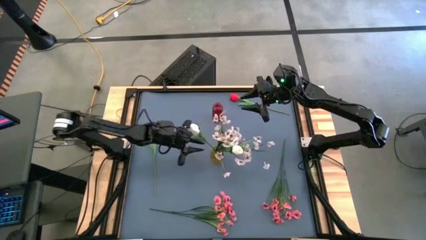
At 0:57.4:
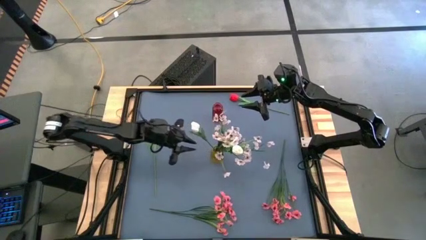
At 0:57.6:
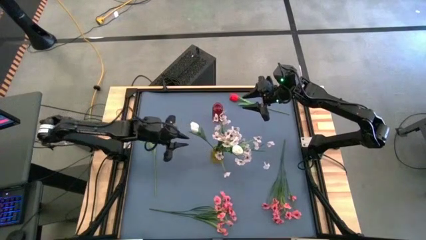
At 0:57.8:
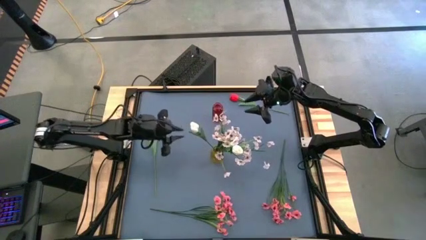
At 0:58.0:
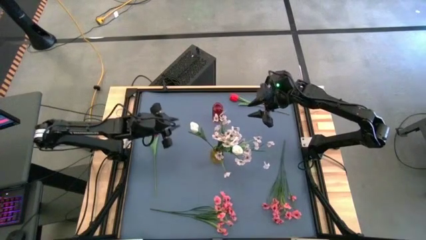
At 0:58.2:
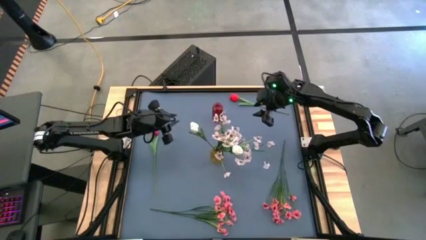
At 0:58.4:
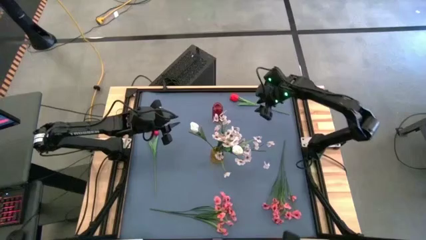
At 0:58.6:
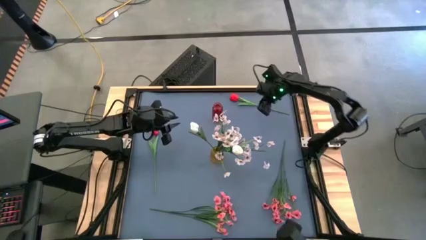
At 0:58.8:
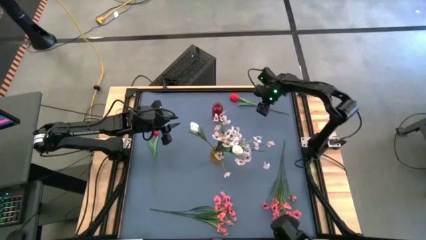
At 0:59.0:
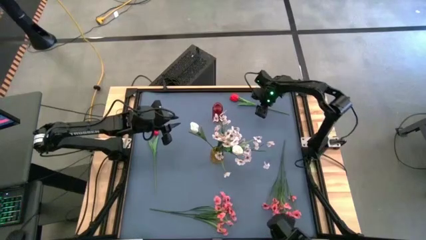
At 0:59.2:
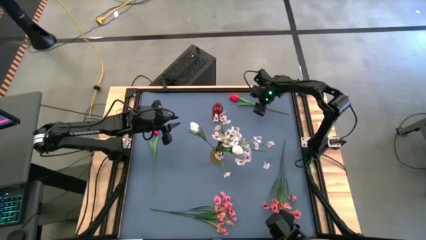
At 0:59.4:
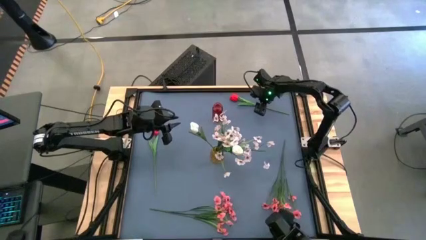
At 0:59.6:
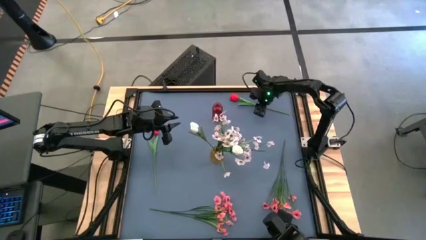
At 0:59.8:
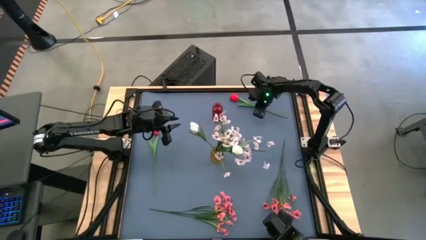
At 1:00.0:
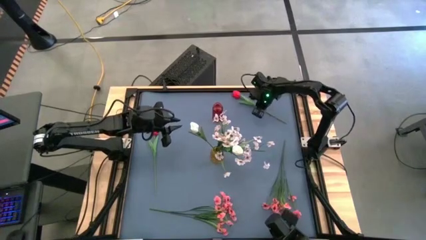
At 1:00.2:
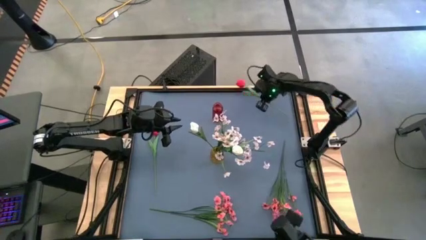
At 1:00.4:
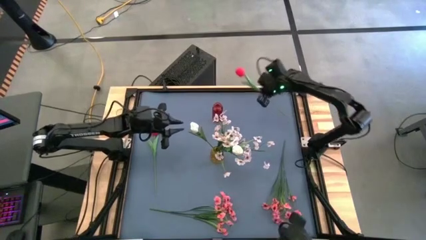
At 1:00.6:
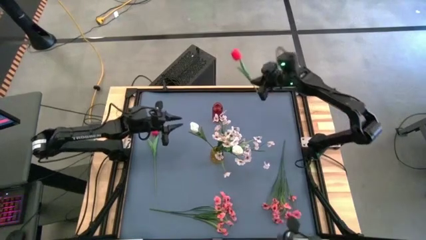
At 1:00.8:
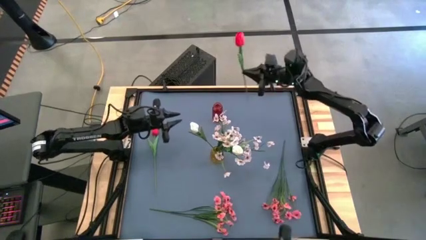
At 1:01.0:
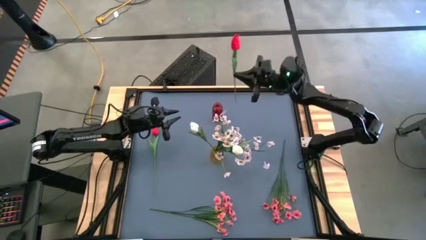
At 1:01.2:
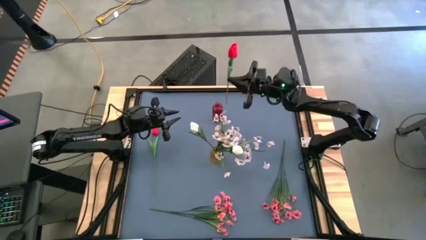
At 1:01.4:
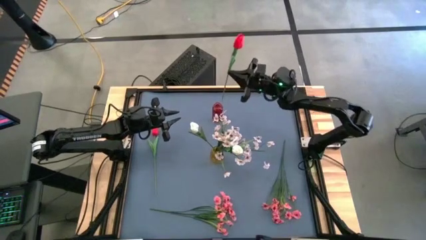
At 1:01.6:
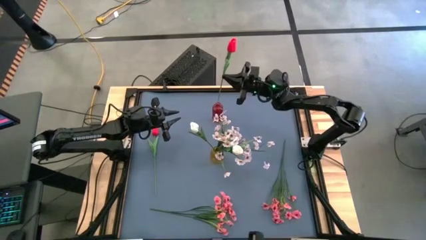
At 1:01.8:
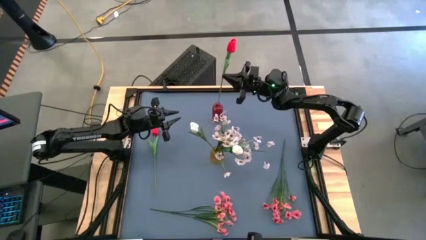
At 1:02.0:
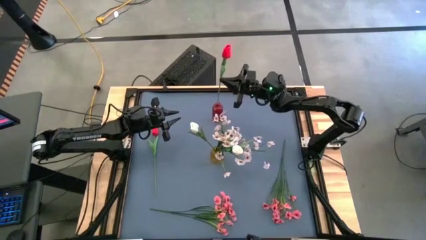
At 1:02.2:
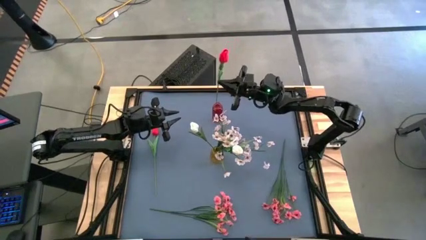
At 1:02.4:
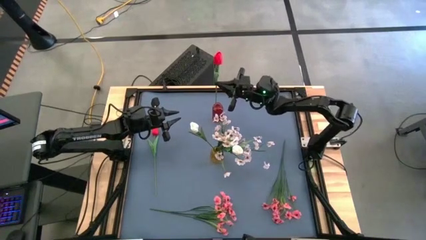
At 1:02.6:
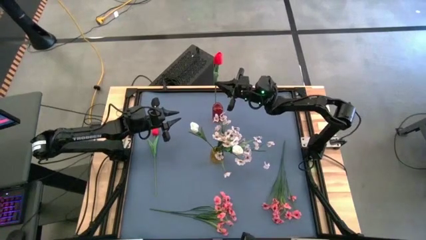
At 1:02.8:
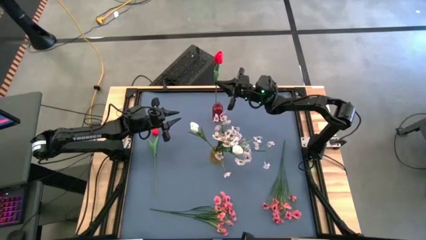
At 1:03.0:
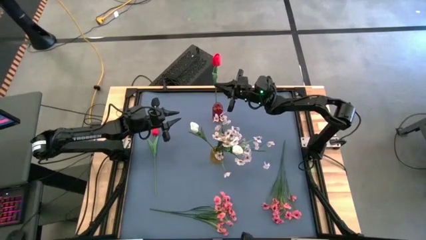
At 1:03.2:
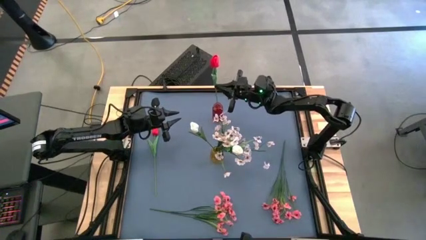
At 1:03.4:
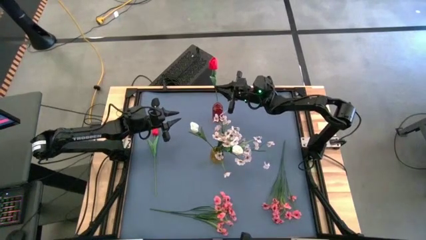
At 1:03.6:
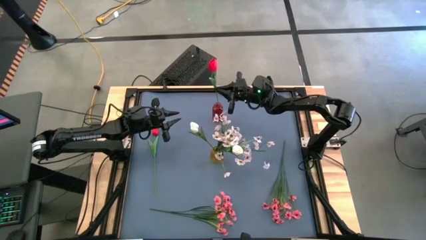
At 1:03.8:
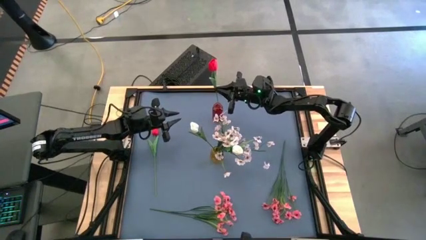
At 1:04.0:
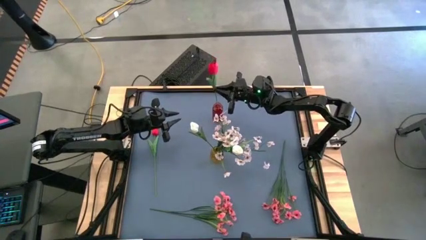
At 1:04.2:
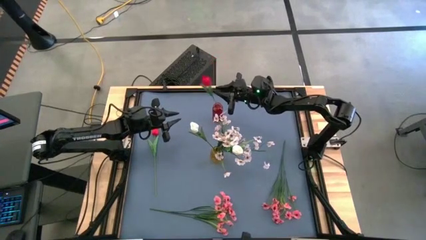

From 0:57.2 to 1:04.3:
Task: Sort flowers into vase by color
Put the right red flower into the red flower vase

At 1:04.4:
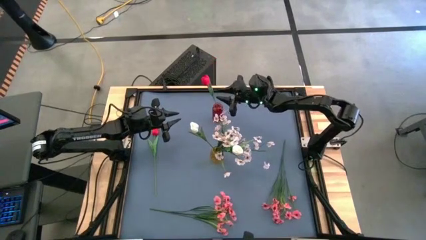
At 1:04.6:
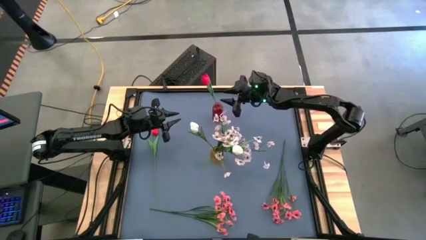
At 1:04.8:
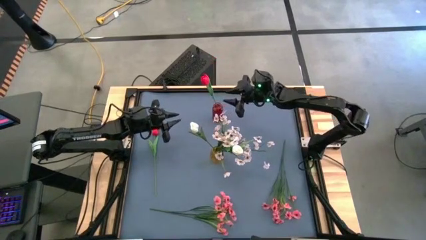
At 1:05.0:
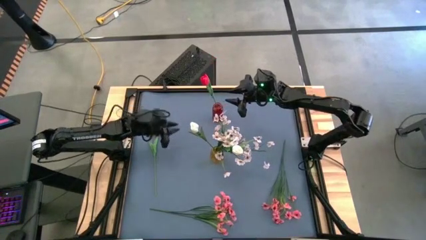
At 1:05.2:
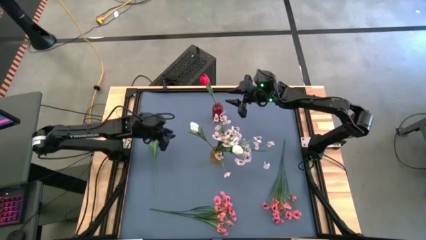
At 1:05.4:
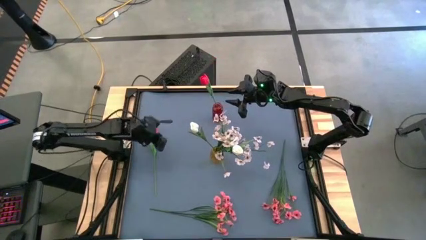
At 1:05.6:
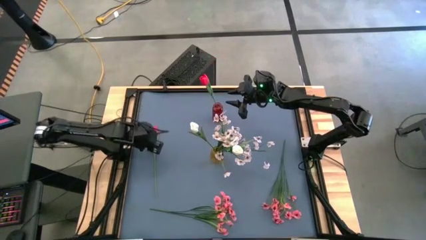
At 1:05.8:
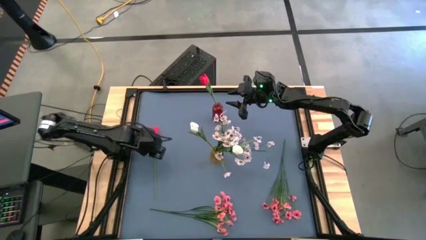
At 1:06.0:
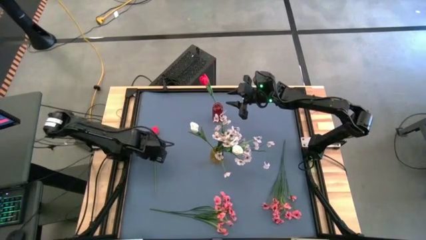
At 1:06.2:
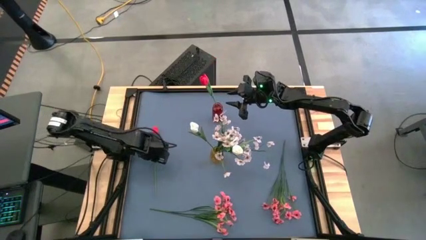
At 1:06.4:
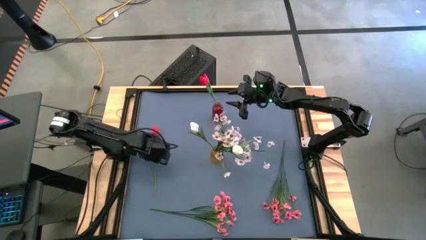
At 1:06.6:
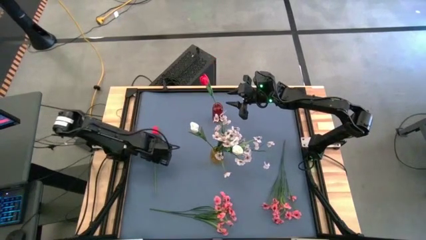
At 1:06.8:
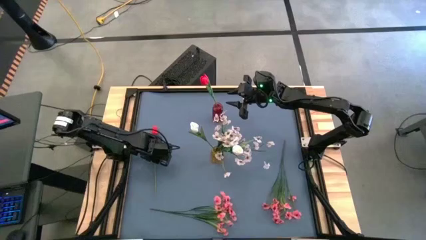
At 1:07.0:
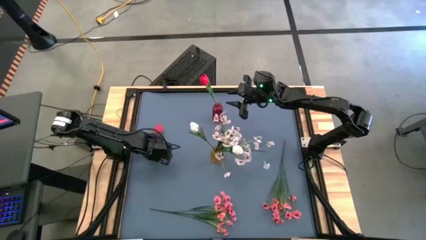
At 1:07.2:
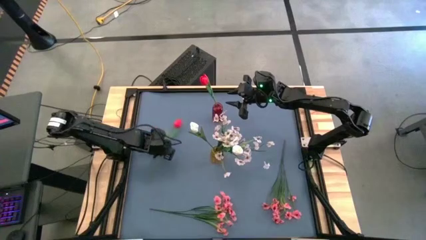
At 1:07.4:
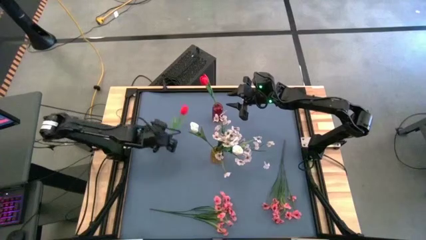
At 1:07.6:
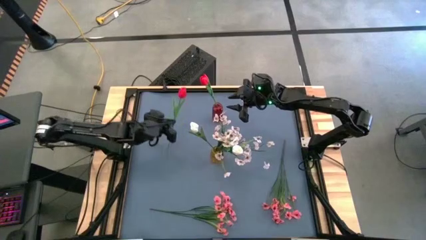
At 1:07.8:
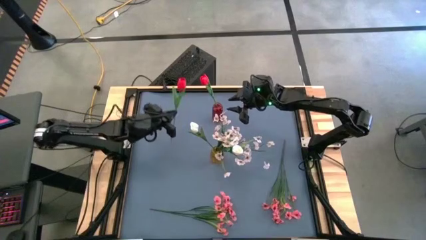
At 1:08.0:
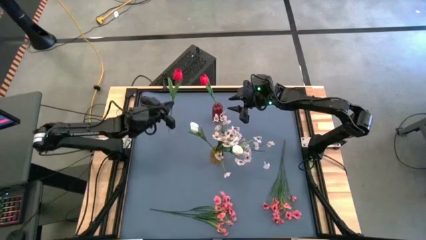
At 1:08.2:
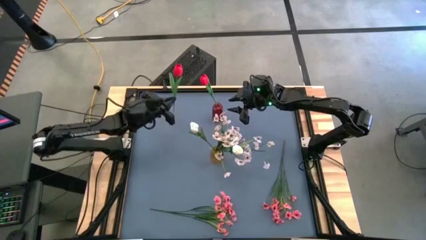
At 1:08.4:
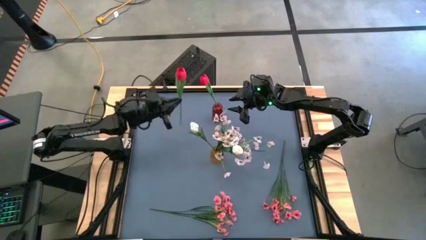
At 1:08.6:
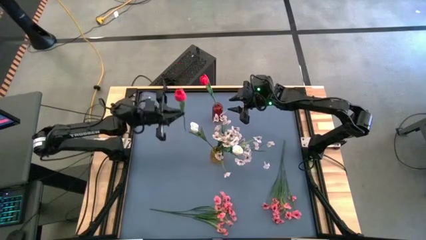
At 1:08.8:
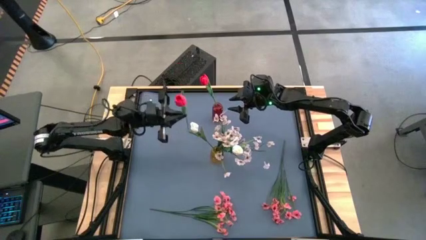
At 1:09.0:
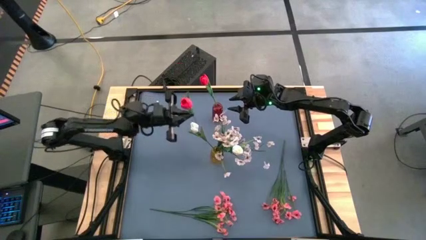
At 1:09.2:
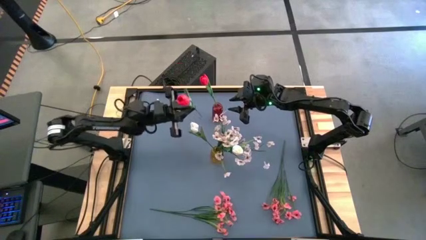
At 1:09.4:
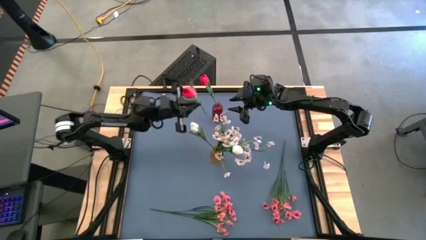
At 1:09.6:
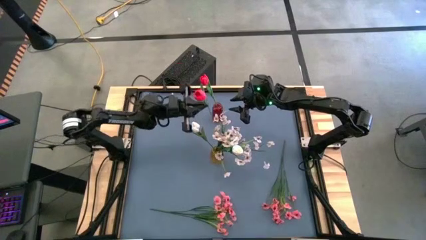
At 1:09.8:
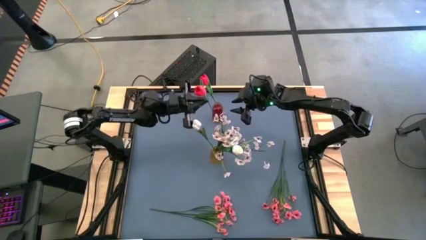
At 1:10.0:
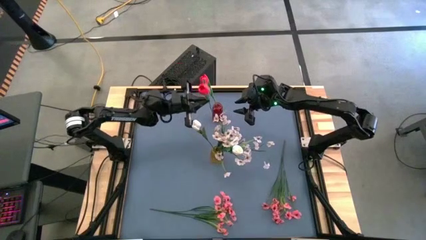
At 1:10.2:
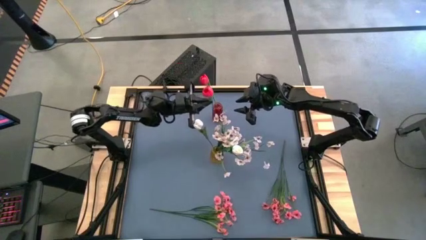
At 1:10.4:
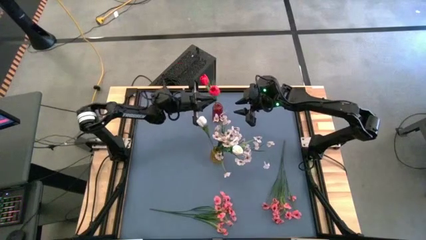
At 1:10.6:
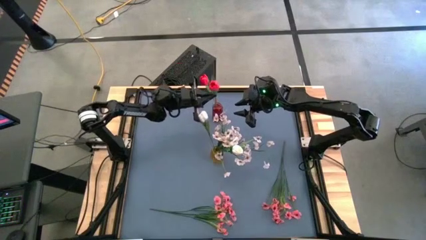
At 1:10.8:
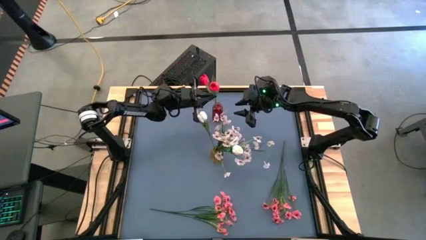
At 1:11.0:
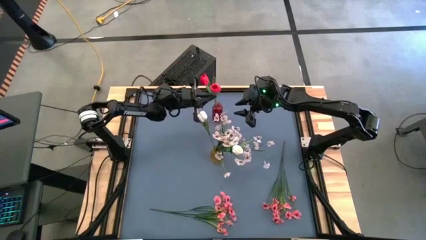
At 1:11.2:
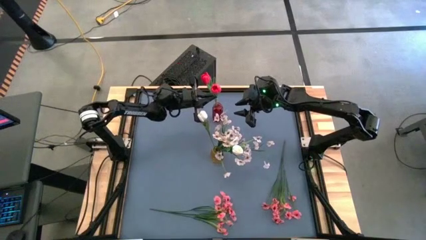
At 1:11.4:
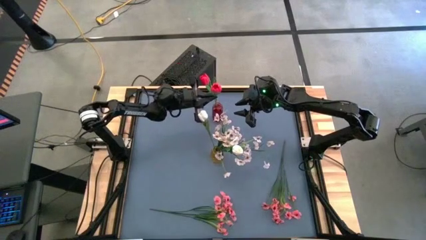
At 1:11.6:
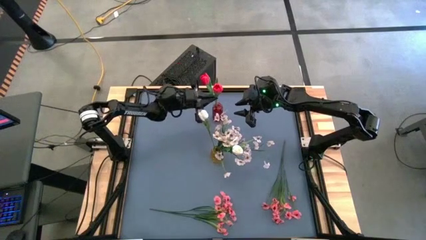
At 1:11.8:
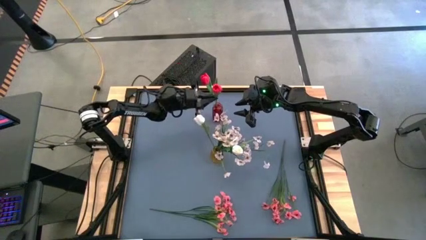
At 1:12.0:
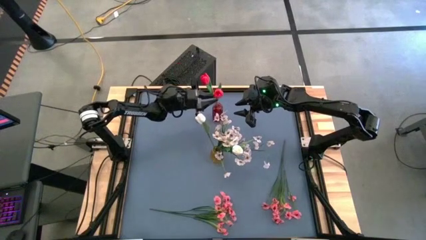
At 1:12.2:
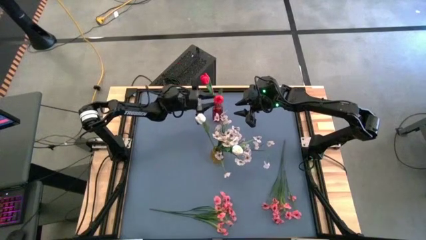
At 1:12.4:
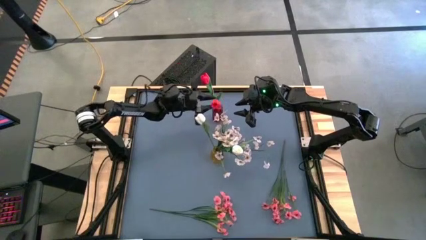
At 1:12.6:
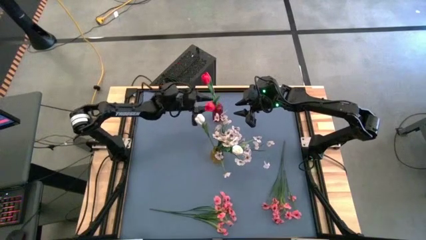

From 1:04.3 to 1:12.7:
Put the red flower into the red flower vase
